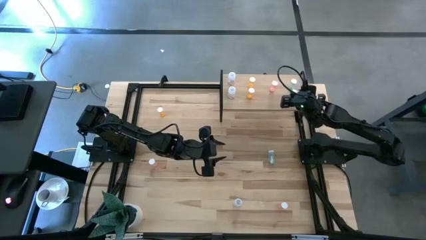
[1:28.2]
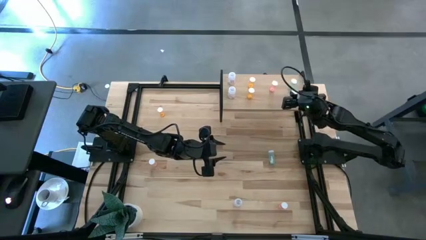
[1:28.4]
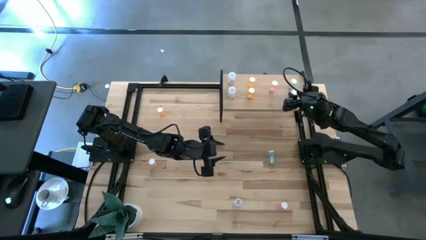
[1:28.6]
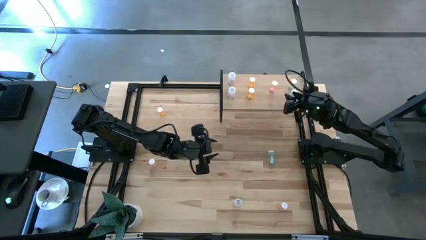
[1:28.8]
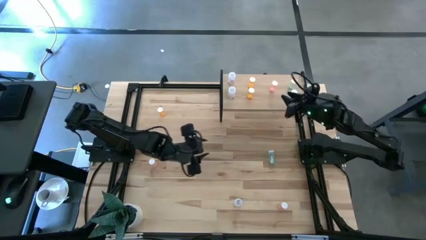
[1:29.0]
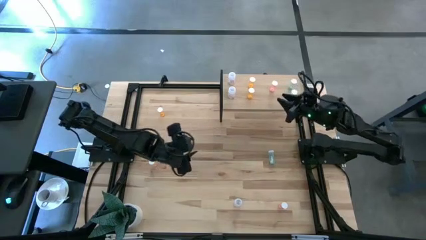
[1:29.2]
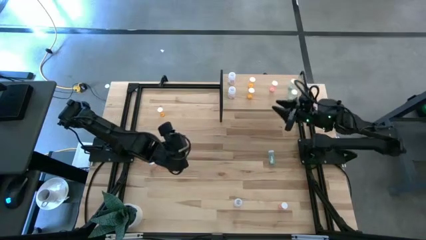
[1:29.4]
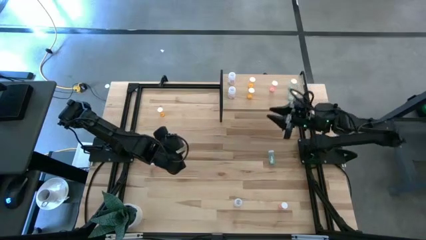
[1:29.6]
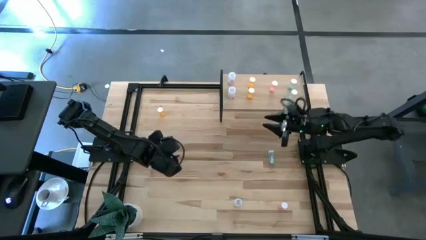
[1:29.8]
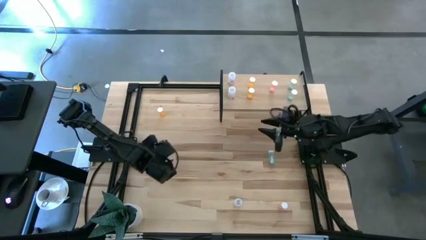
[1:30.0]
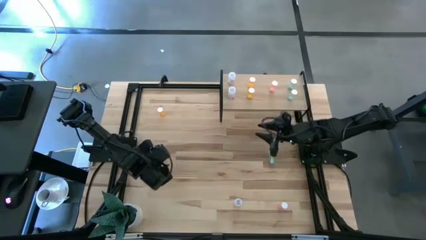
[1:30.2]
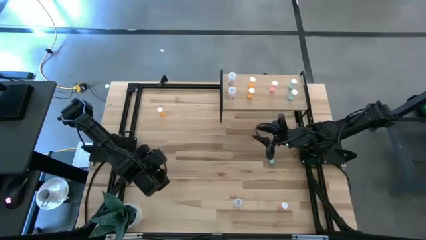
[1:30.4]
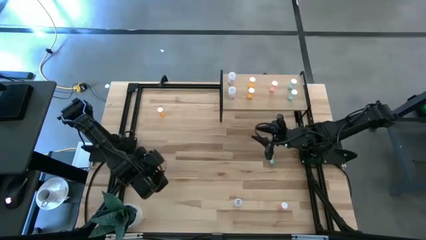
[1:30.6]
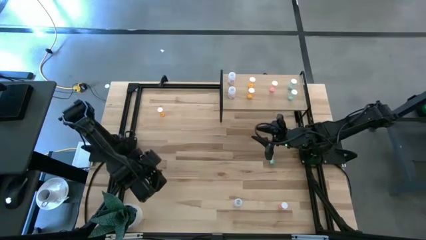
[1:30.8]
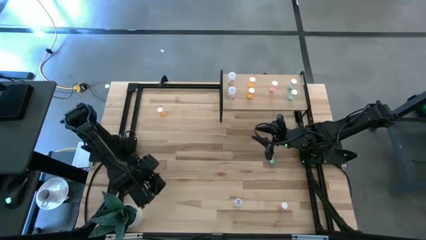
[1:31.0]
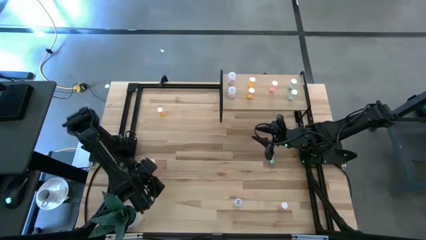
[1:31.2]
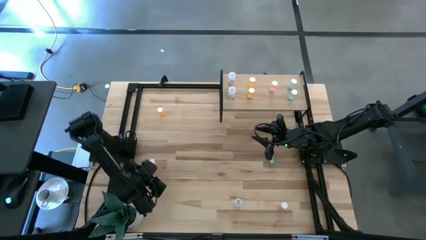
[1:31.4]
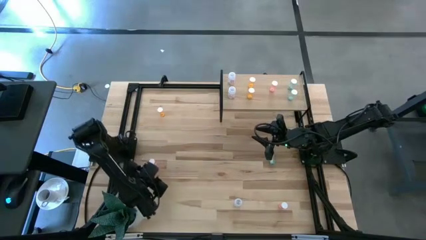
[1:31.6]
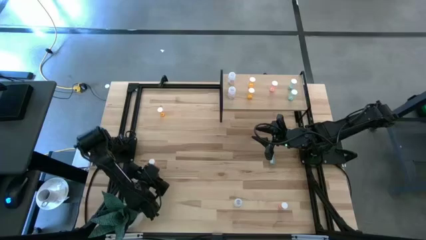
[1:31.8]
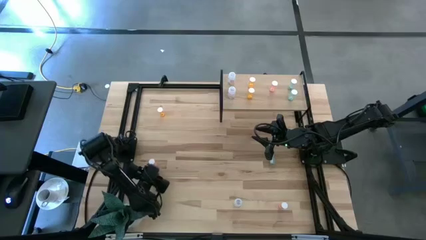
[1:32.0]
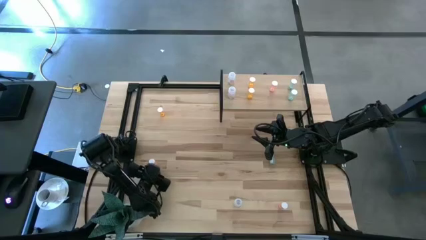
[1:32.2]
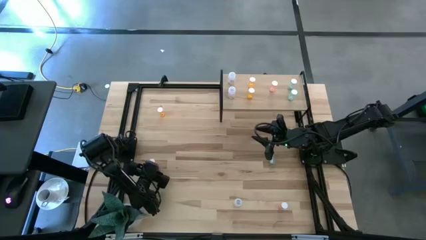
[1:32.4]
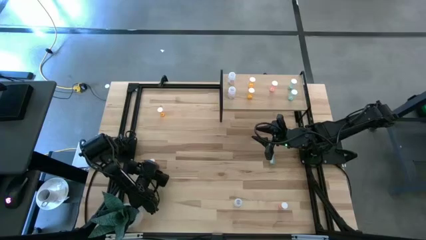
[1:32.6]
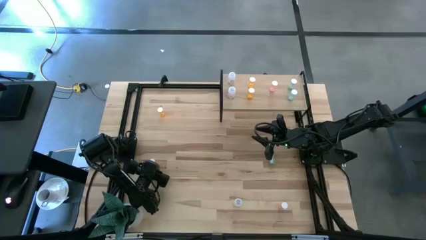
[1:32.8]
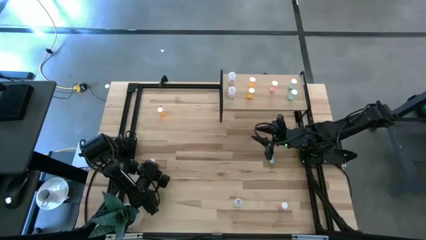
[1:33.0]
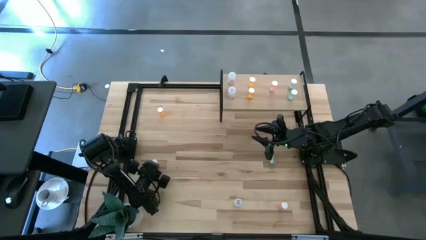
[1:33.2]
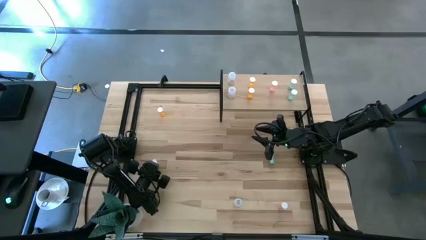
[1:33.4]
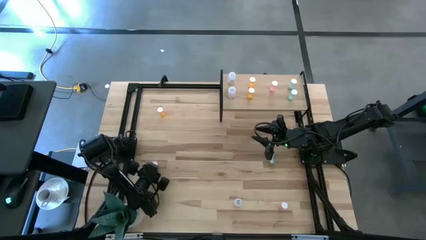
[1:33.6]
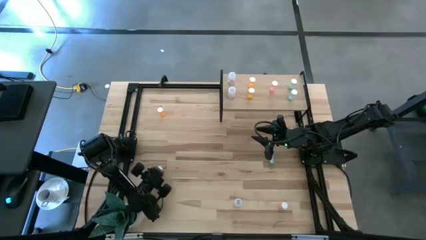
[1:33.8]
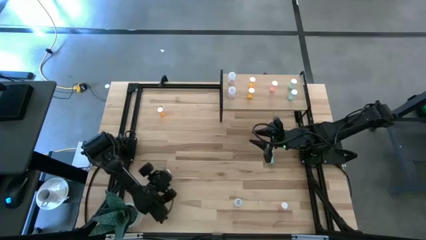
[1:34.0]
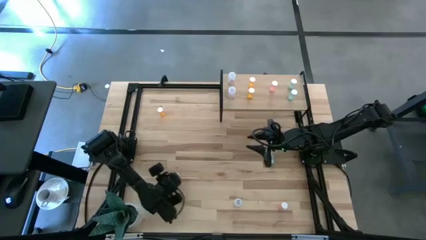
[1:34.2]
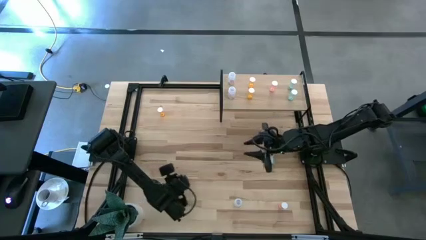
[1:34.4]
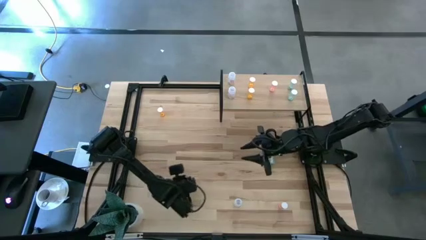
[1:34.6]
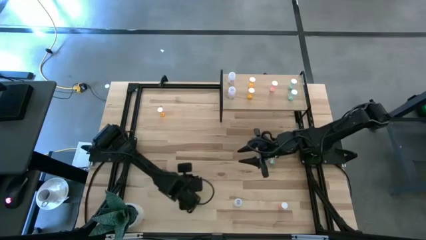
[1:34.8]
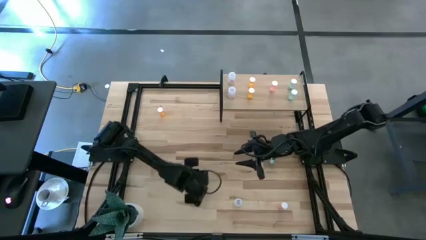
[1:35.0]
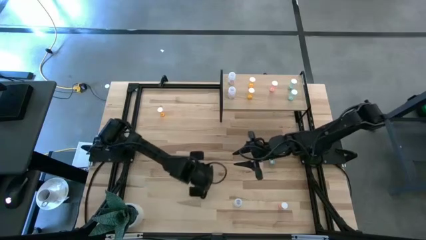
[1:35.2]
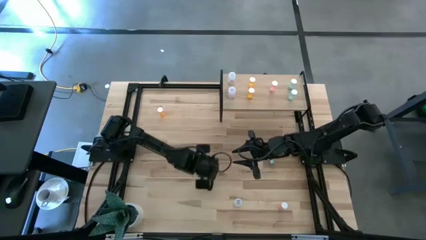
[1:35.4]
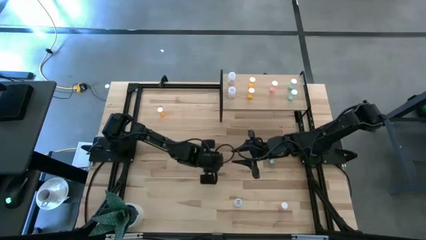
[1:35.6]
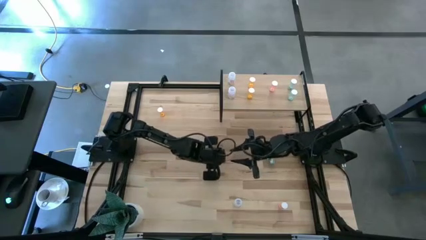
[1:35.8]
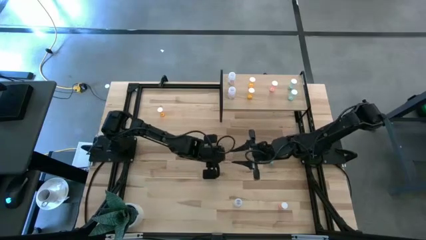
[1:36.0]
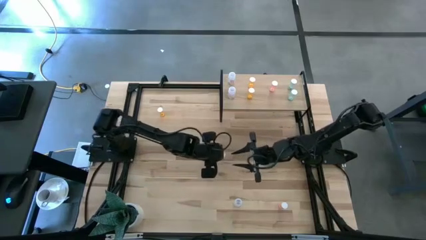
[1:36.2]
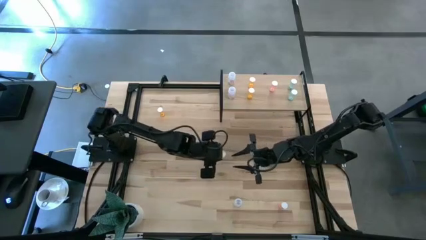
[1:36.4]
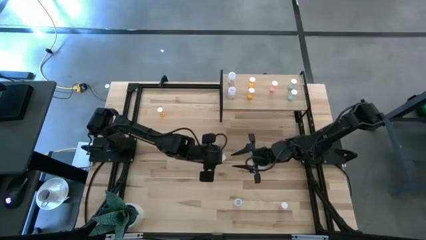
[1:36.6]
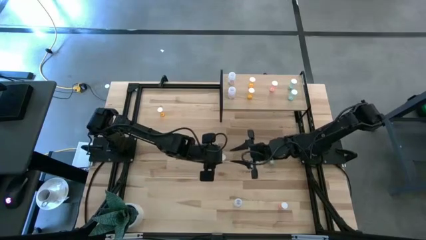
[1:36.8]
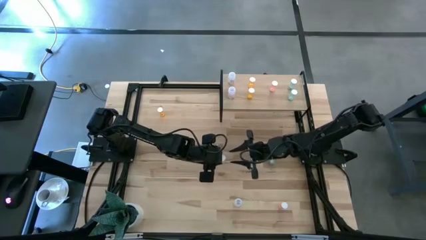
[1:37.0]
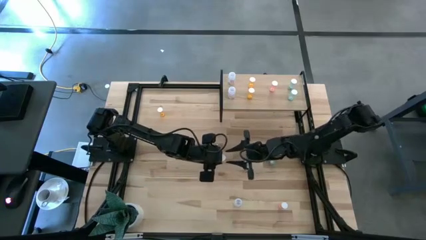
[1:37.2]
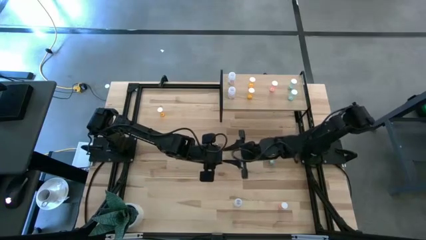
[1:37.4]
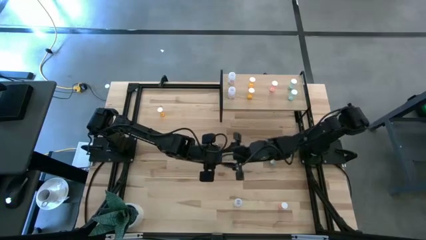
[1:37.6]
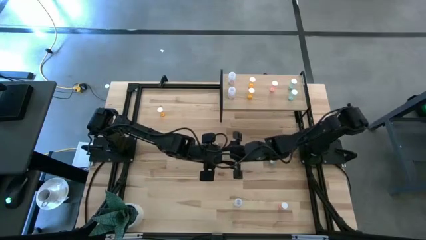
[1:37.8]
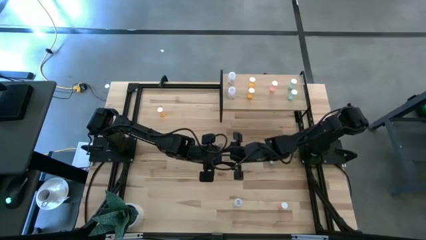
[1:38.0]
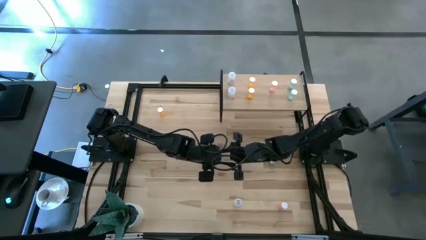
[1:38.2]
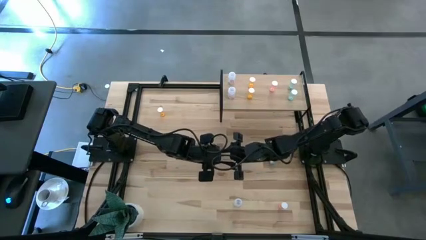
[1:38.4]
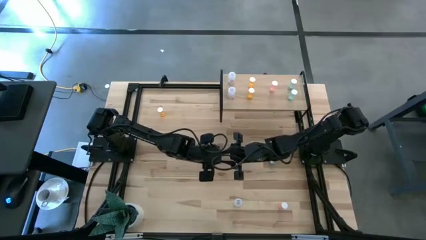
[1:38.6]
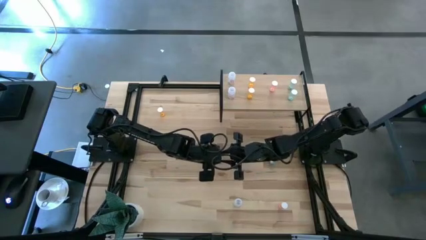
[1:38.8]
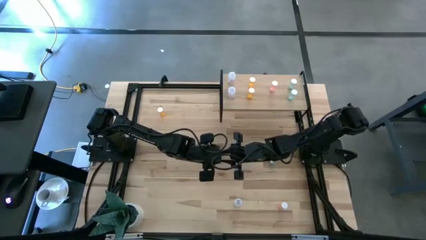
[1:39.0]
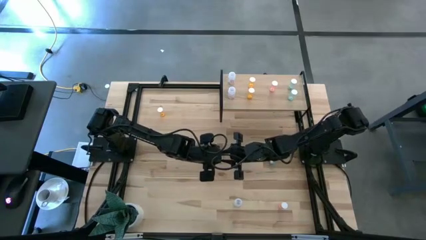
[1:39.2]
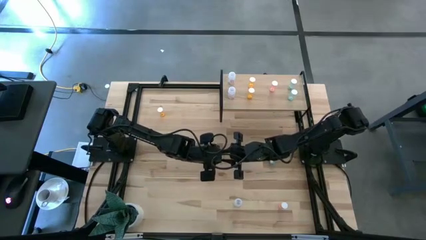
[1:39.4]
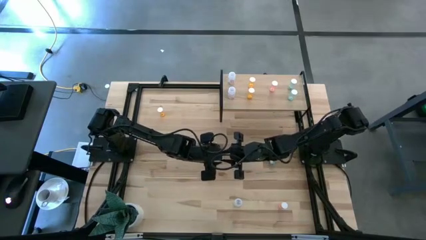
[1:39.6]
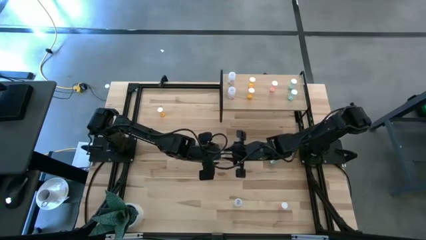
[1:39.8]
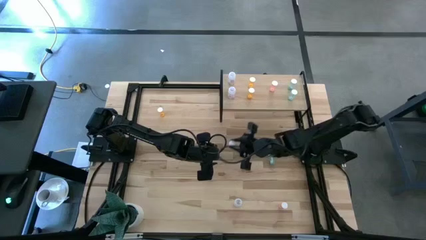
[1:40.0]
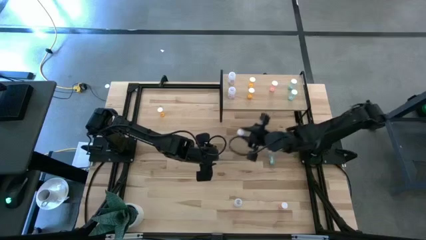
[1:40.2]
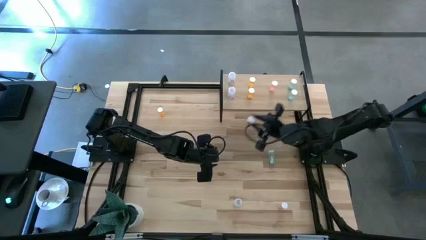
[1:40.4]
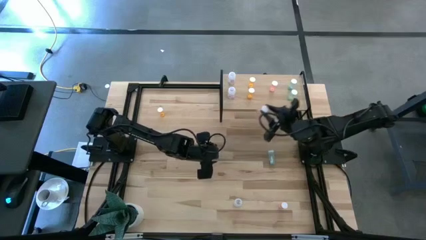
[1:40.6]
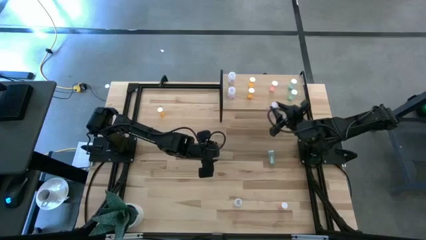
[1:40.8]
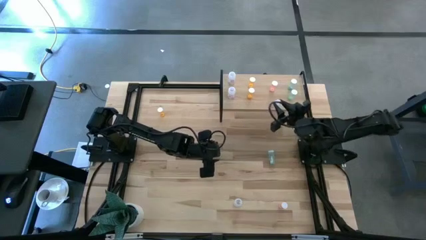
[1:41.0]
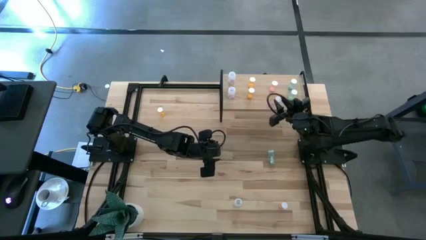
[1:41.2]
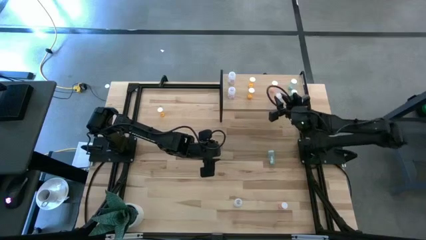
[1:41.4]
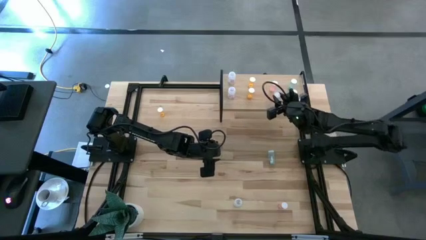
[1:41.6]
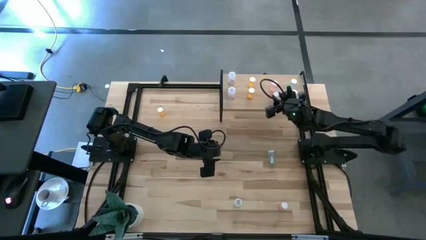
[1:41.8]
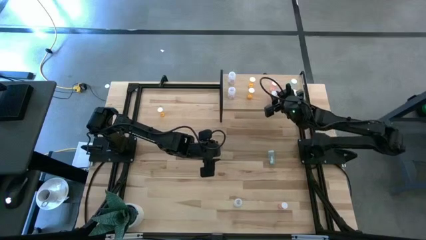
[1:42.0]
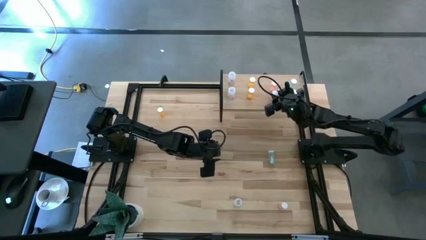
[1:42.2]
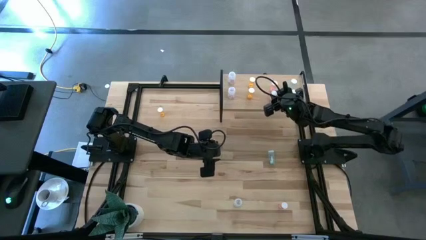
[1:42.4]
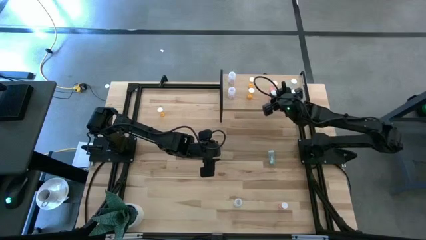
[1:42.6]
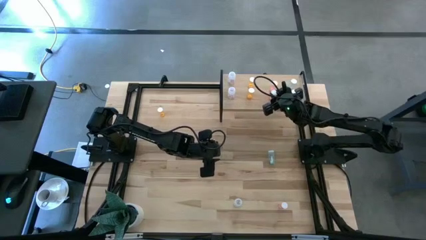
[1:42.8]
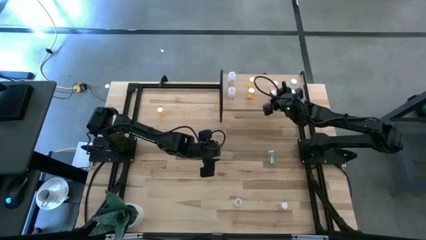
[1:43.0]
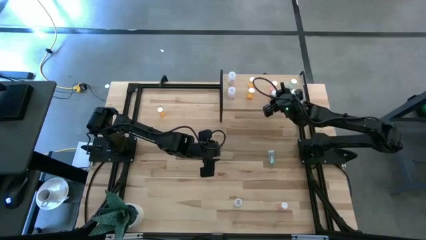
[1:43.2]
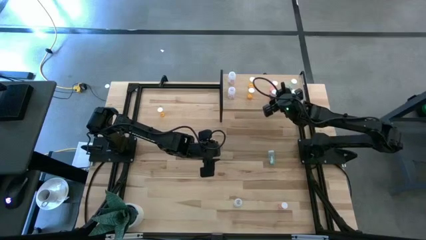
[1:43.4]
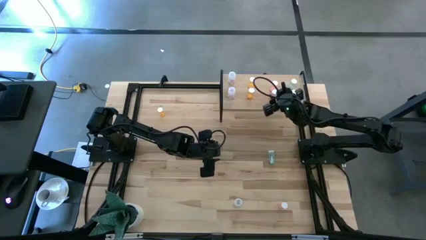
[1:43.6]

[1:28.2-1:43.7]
Task: Pick and place medicine bottles onto shelf by color
Put the left pink pill bottle on the shelf aligned with the other pink pill bottle
